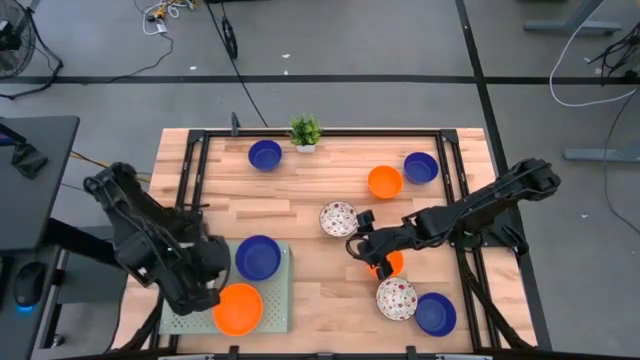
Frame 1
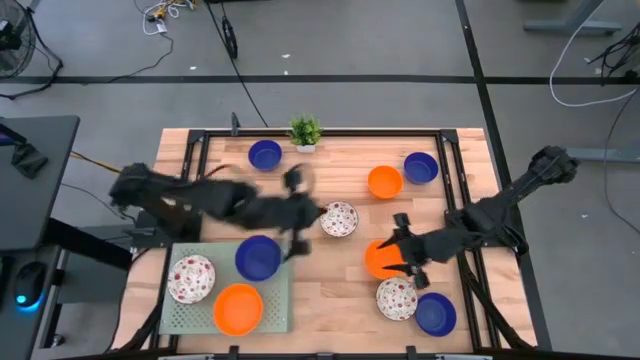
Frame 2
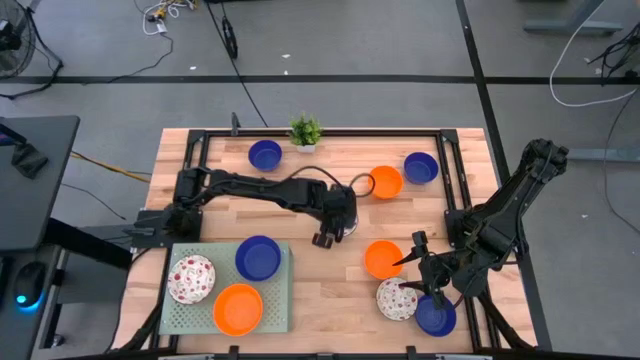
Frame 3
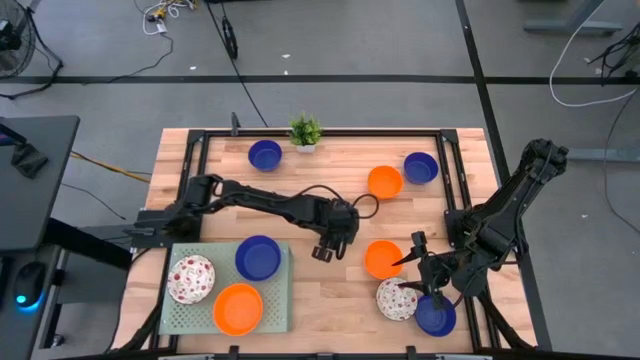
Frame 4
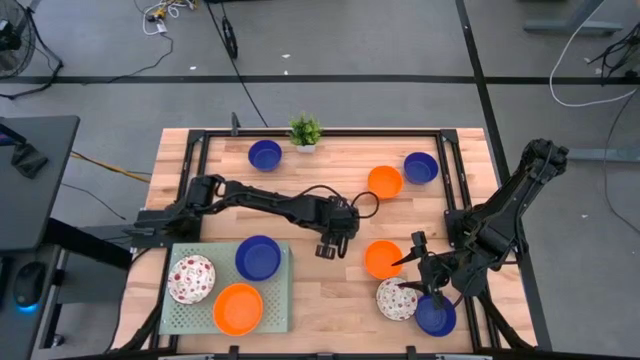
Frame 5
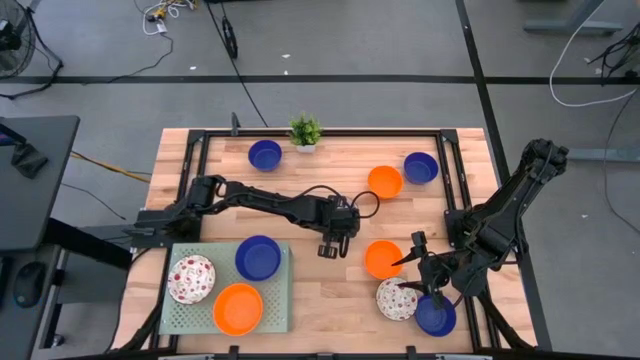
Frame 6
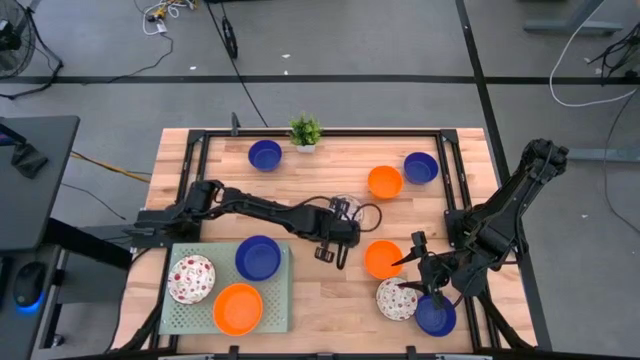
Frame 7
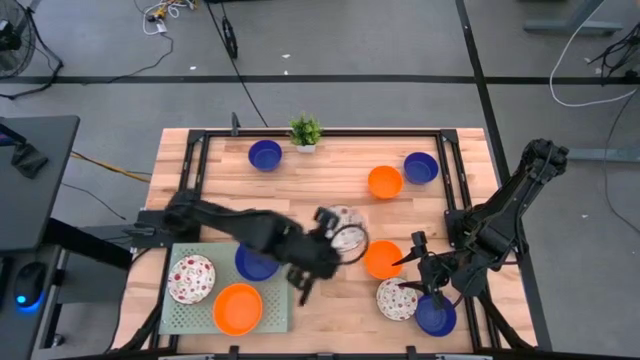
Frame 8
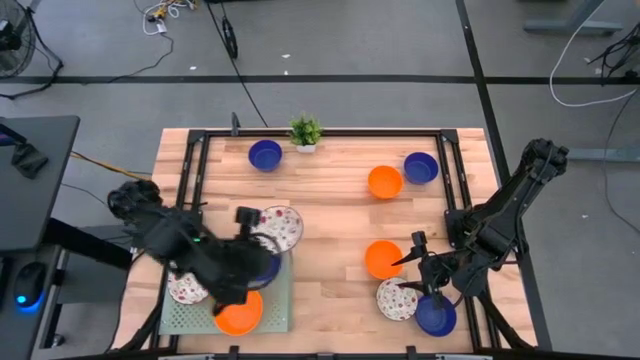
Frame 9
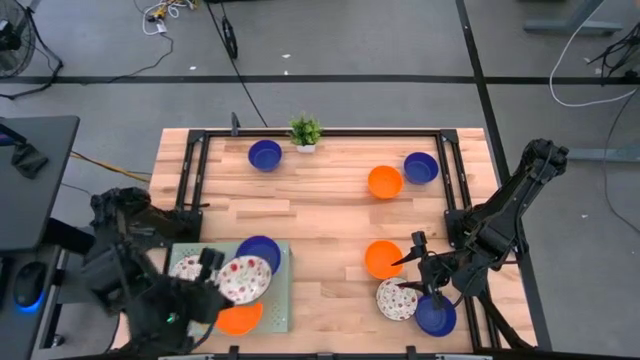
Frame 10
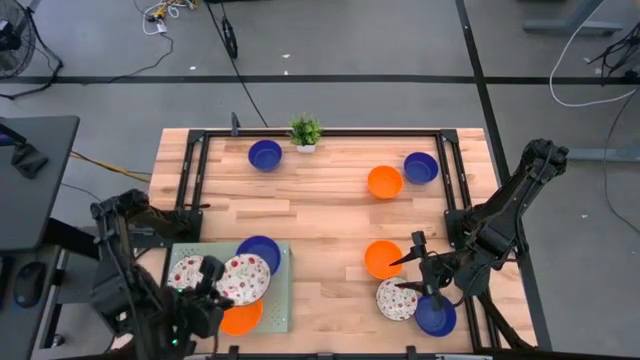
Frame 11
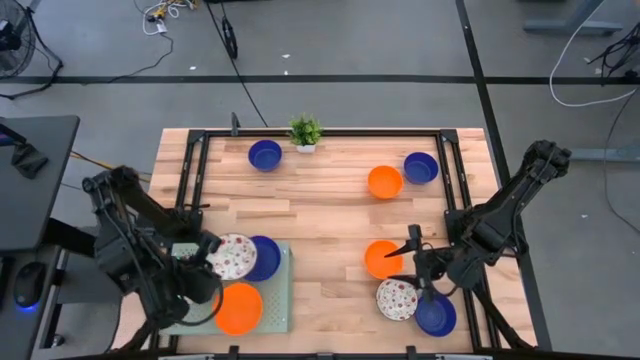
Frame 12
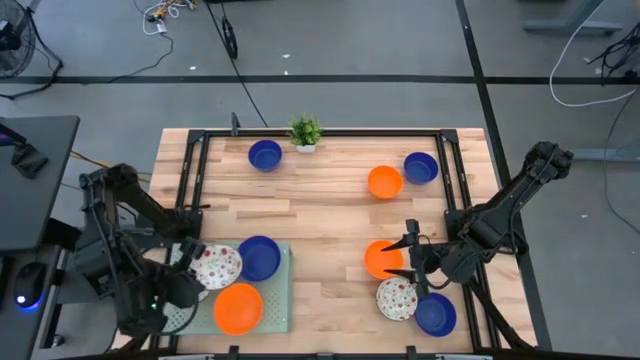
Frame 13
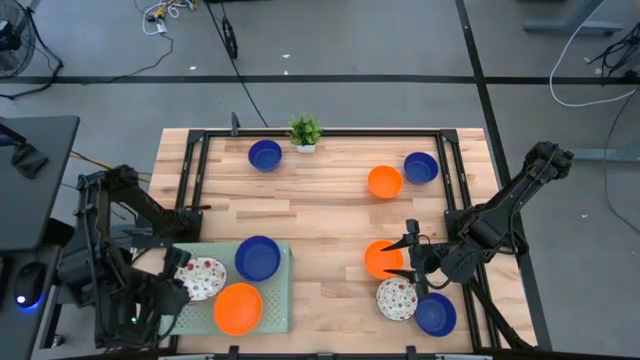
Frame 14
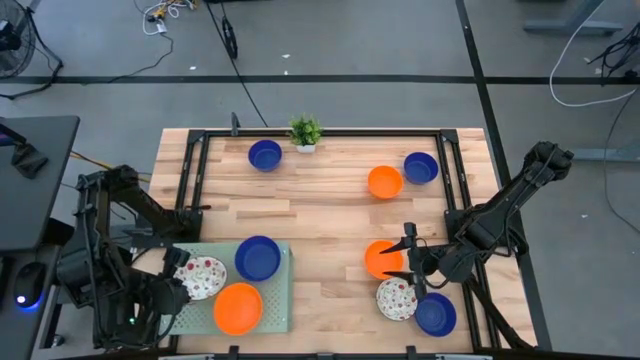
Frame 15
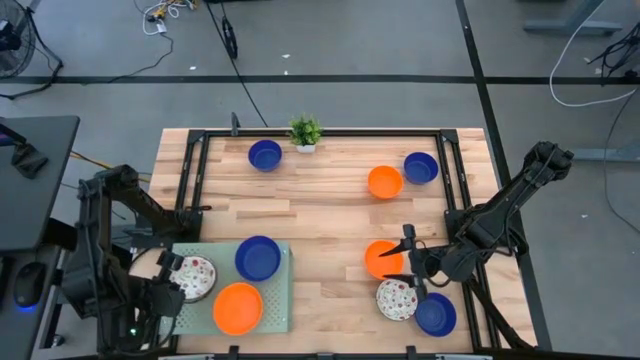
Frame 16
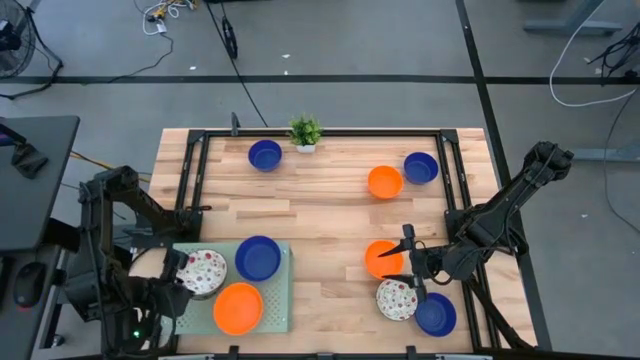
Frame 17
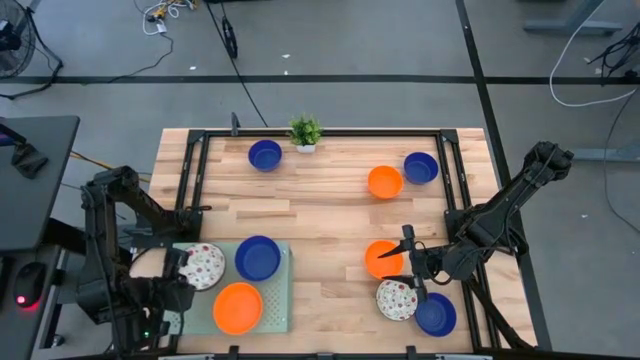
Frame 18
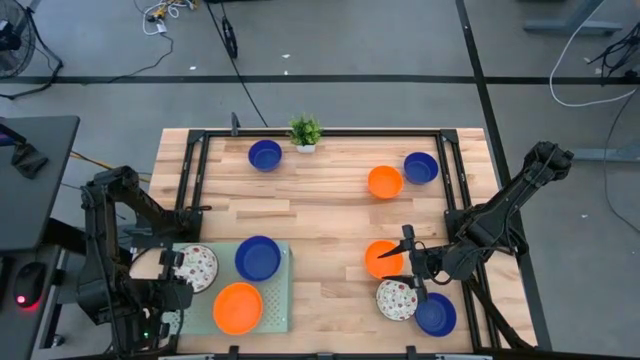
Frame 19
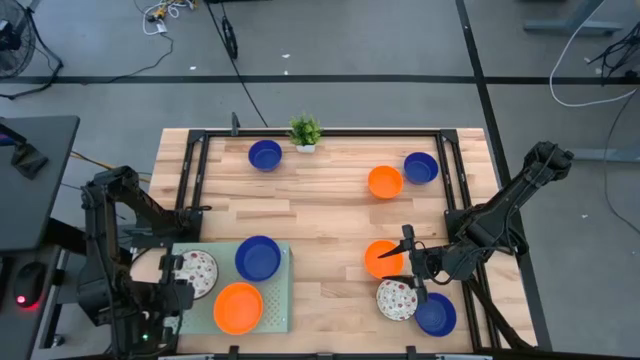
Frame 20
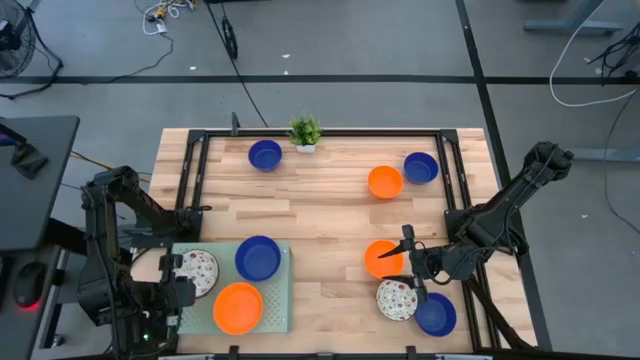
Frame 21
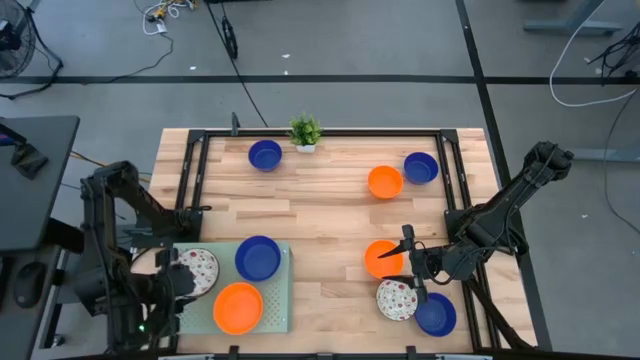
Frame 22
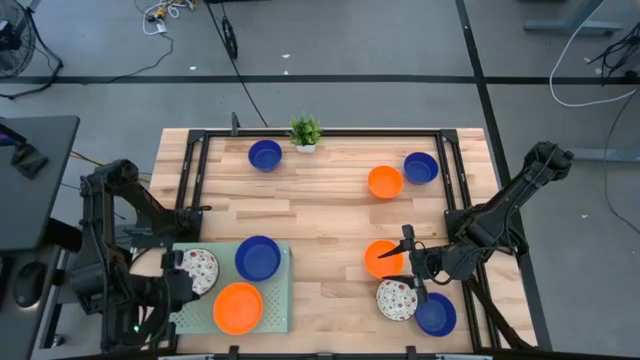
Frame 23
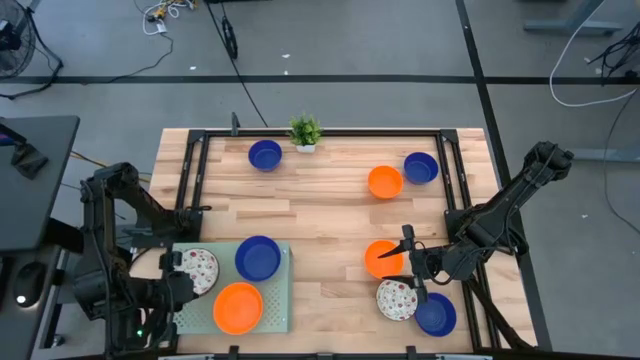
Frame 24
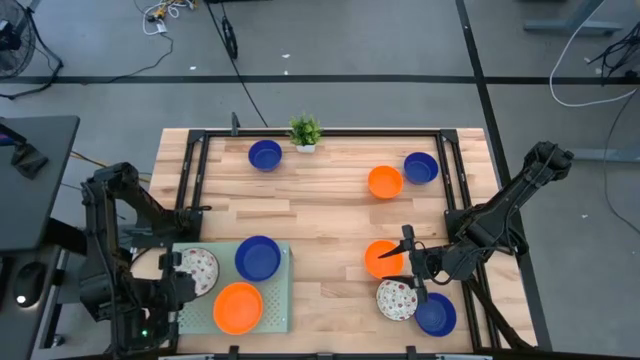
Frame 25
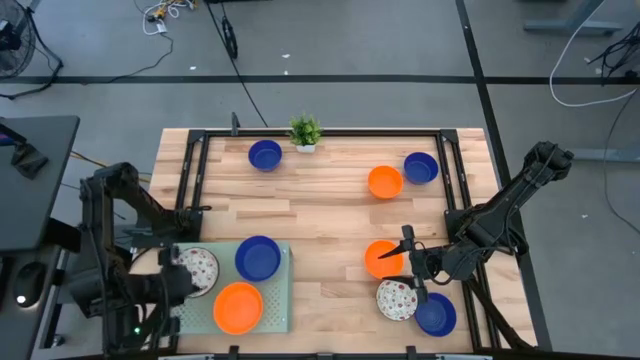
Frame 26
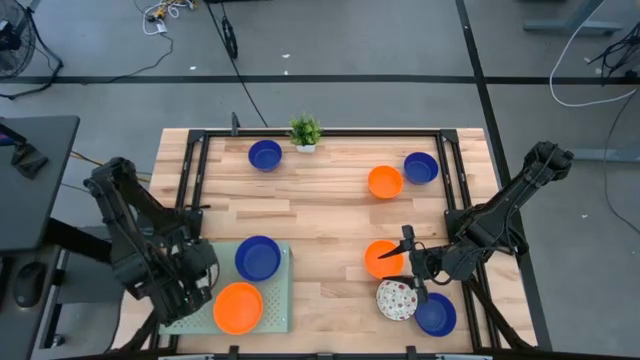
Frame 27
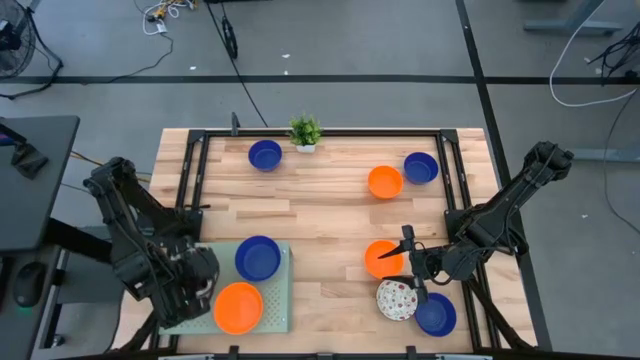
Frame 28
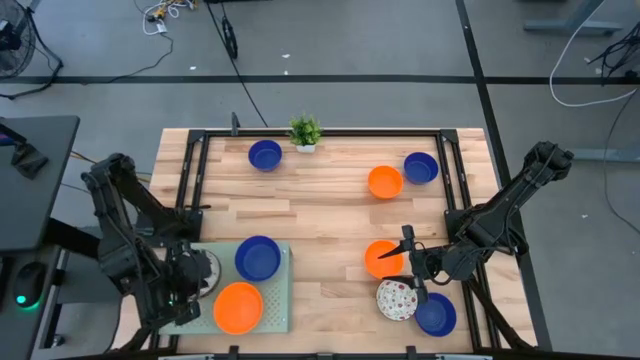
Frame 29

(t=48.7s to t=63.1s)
Task: Pick & Place Mini bowls
Stack the white bowl on top of the white bowl on the shelf

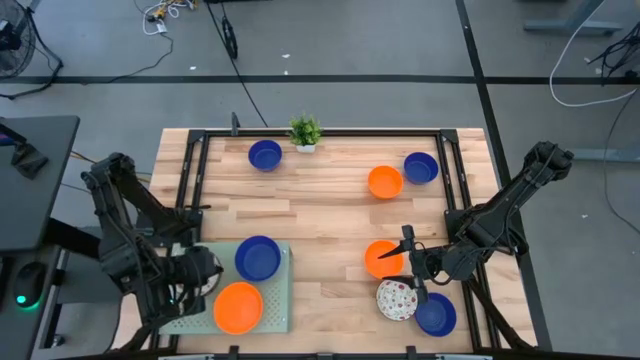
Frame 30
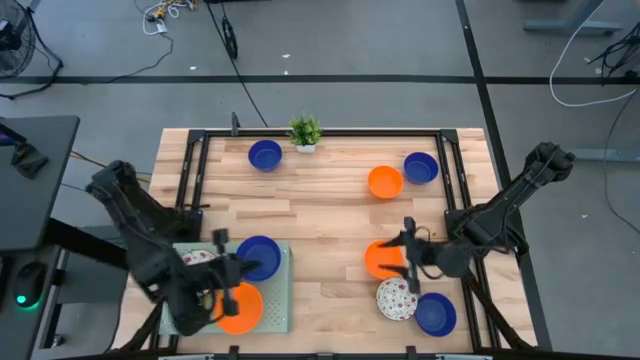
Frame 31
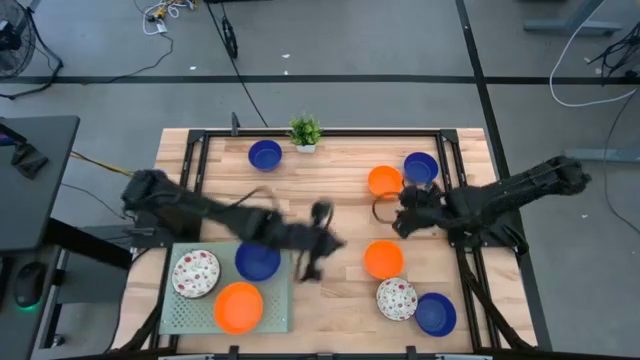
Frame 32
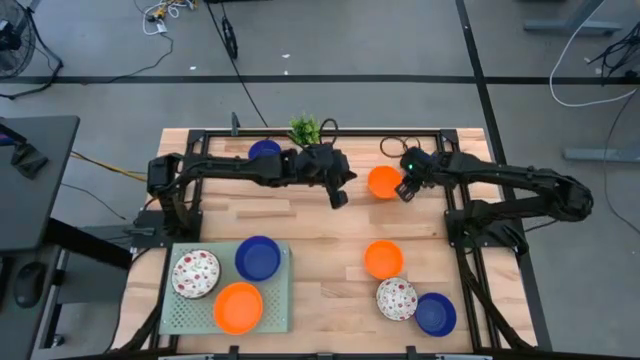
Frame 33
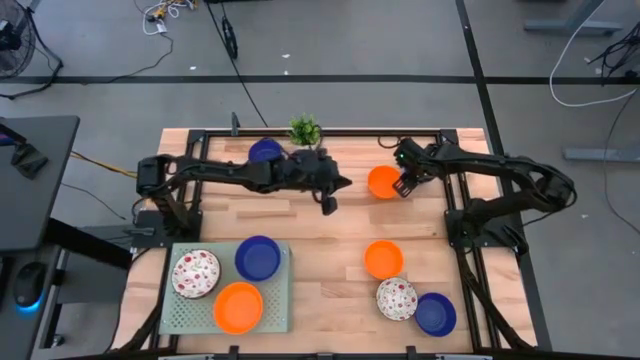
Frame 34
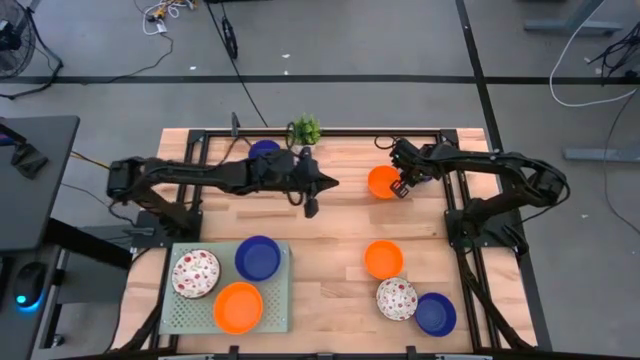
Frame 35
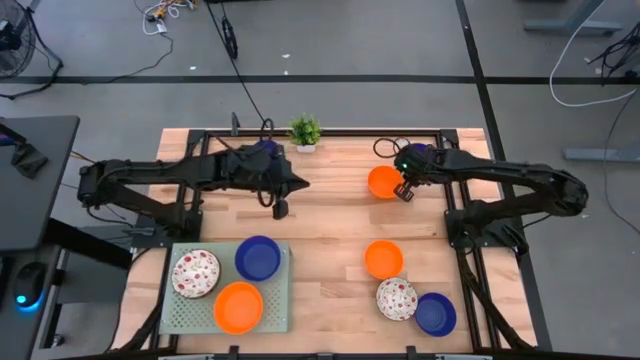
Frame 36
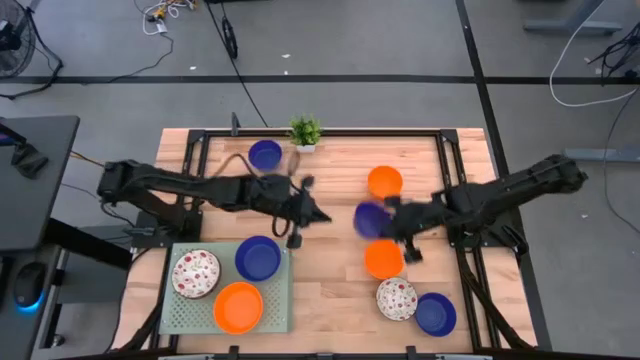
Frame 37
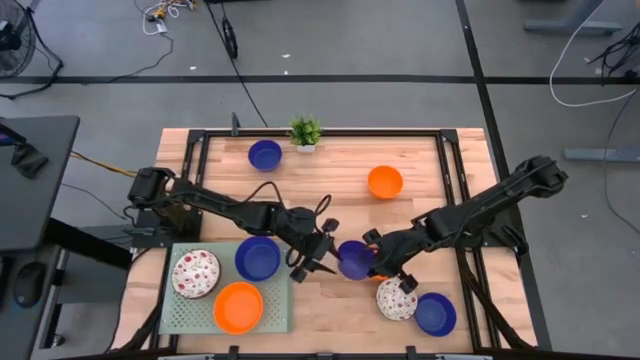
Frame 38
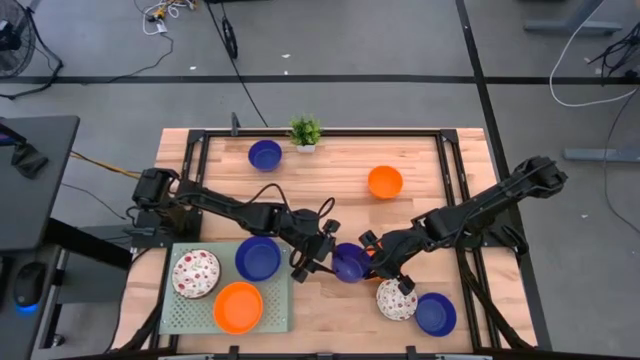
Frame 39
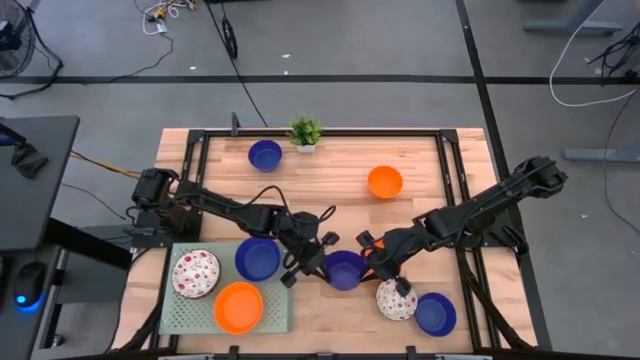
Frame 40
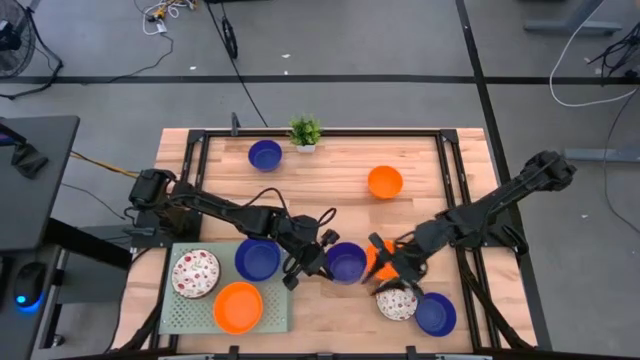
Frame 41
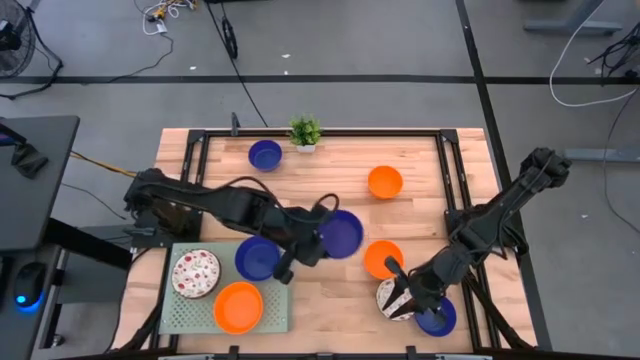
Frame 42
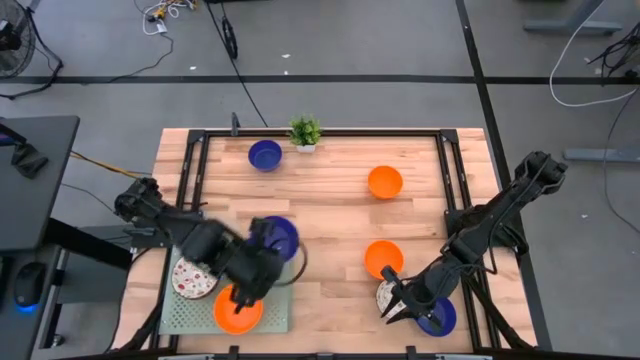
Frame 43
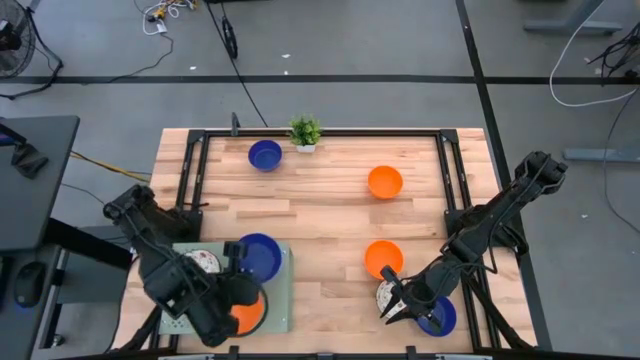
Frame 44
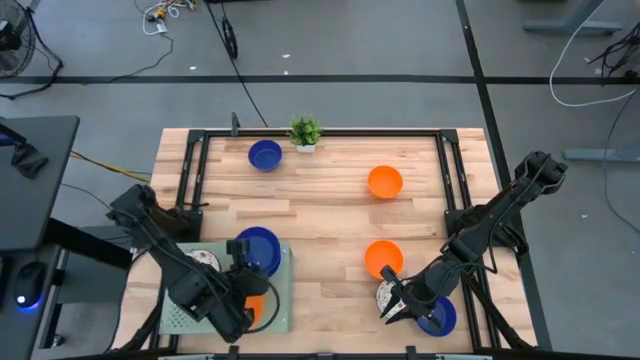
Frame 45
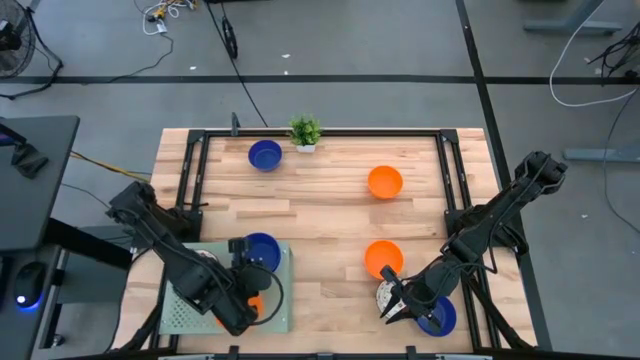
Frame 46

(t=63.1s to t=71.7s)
Stack the blue bowl on top of the blue bowl on the shelf
